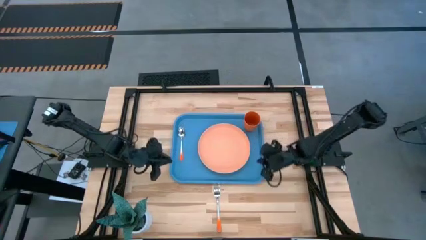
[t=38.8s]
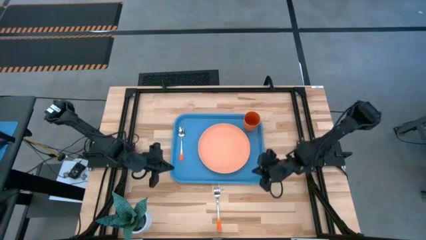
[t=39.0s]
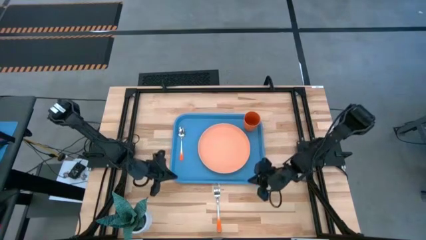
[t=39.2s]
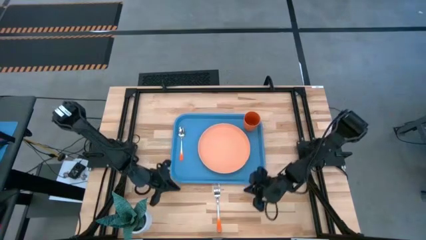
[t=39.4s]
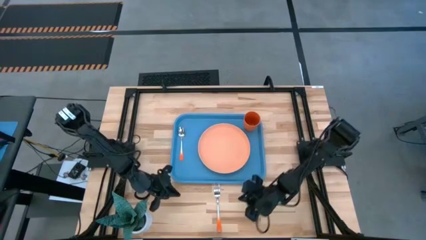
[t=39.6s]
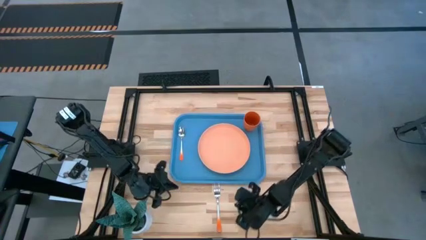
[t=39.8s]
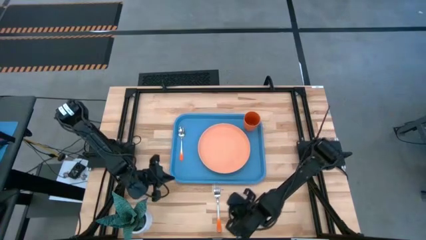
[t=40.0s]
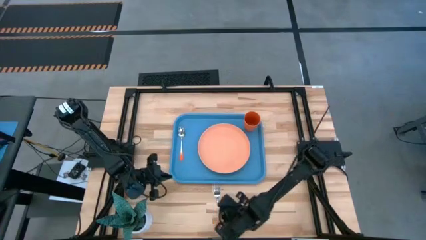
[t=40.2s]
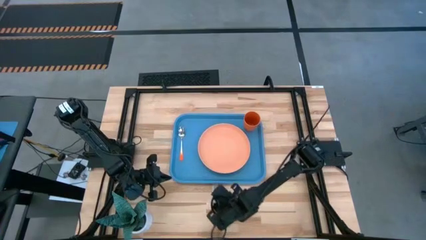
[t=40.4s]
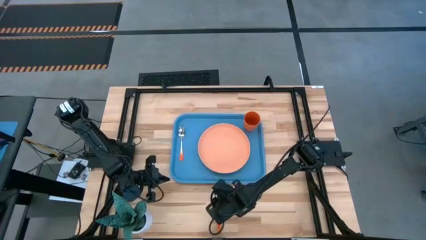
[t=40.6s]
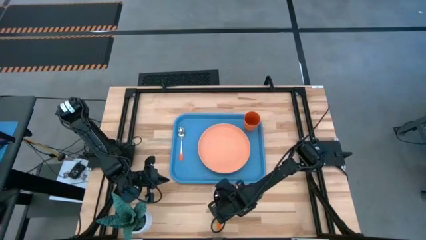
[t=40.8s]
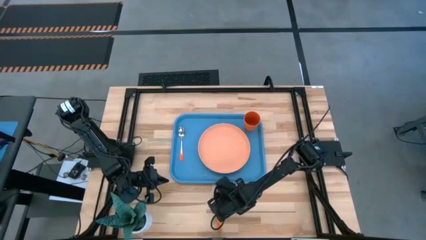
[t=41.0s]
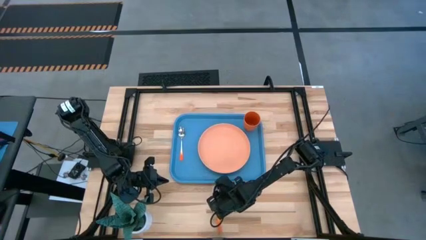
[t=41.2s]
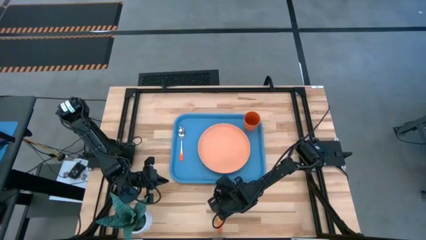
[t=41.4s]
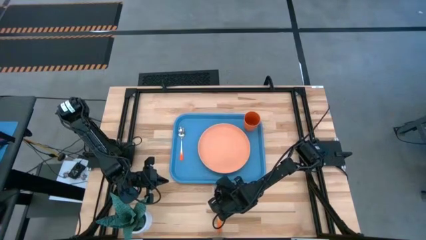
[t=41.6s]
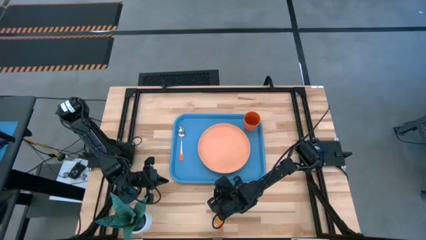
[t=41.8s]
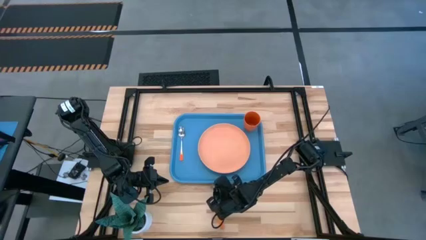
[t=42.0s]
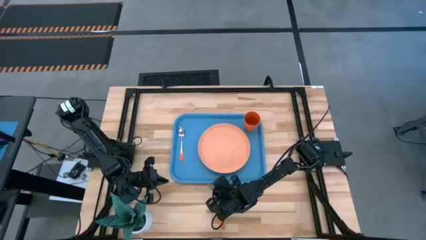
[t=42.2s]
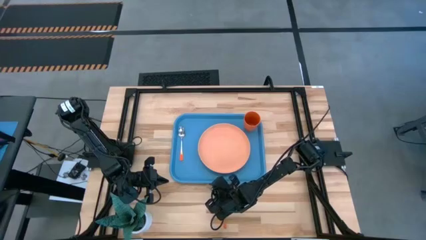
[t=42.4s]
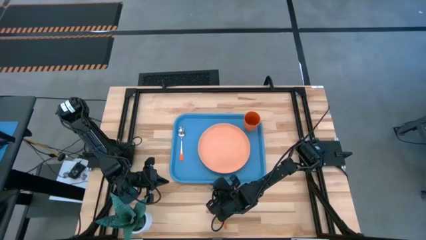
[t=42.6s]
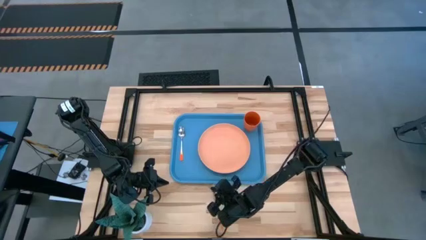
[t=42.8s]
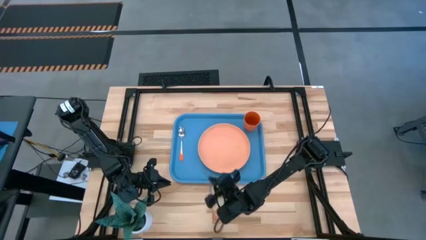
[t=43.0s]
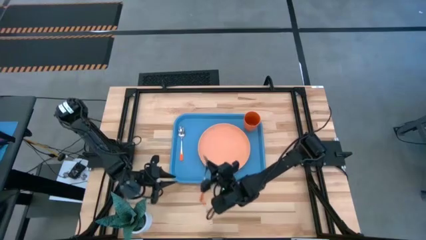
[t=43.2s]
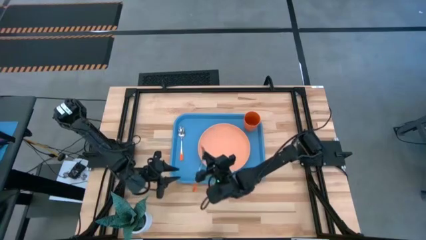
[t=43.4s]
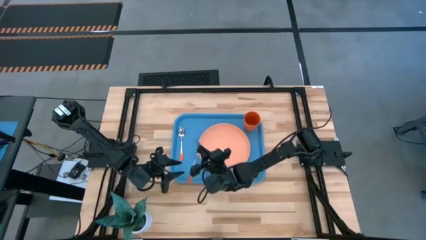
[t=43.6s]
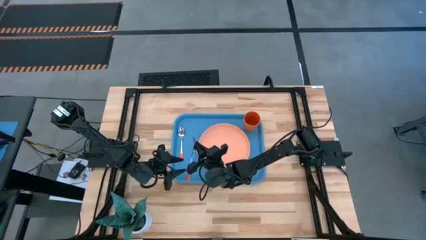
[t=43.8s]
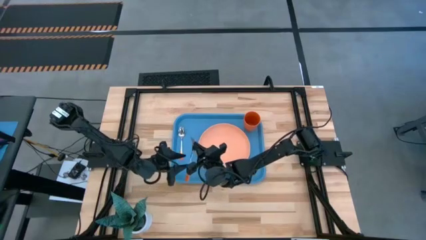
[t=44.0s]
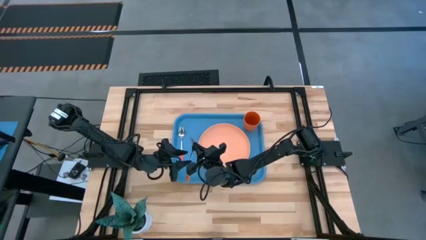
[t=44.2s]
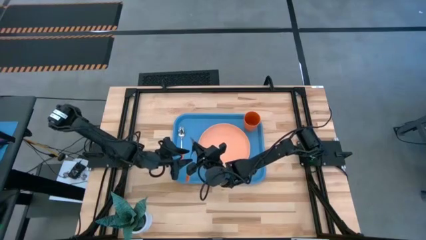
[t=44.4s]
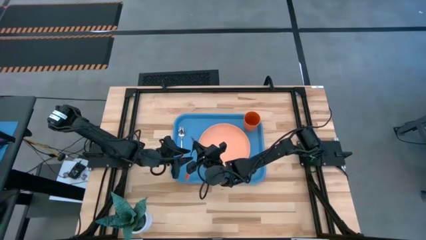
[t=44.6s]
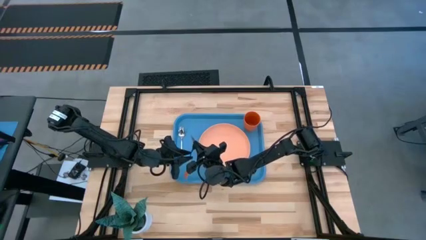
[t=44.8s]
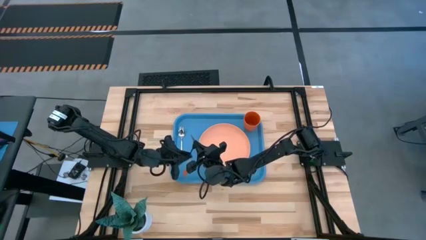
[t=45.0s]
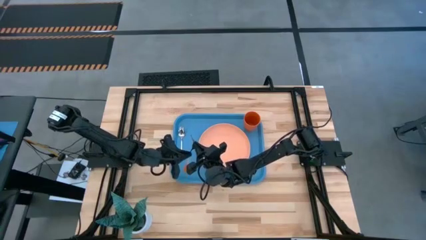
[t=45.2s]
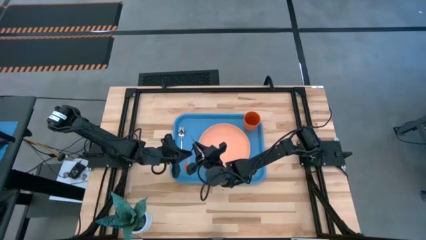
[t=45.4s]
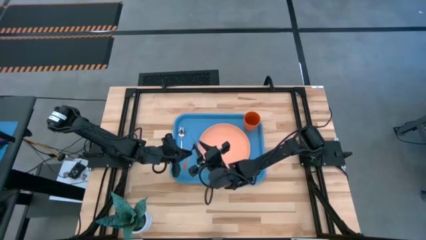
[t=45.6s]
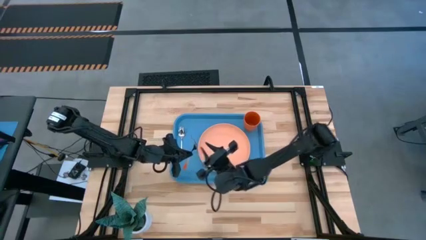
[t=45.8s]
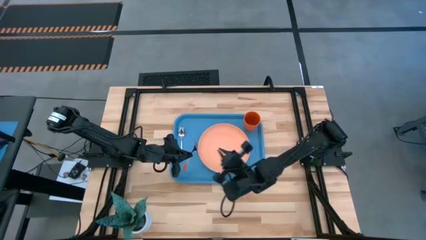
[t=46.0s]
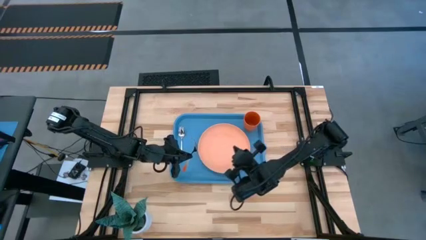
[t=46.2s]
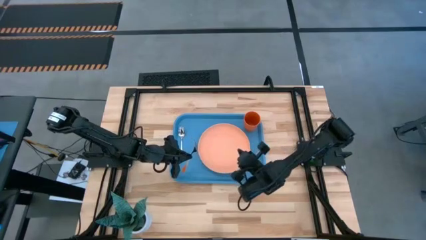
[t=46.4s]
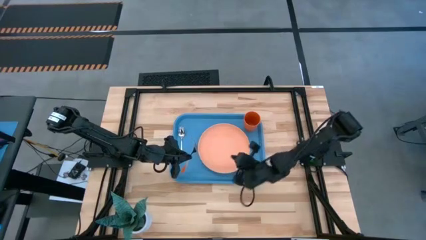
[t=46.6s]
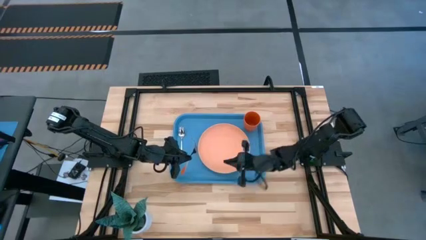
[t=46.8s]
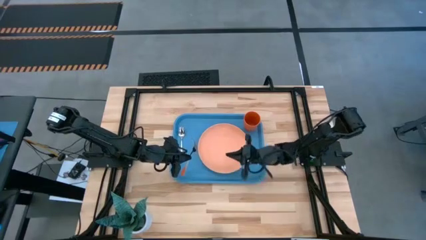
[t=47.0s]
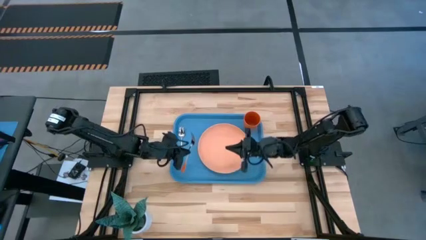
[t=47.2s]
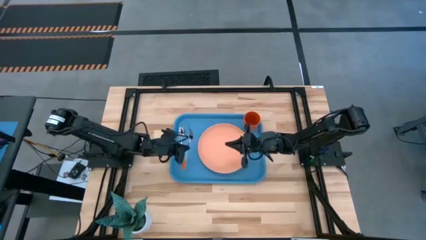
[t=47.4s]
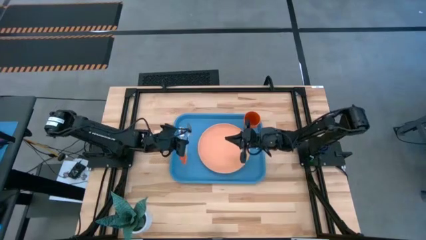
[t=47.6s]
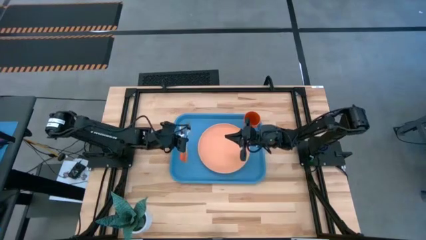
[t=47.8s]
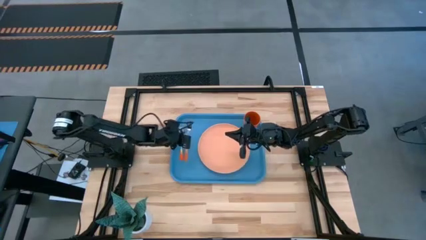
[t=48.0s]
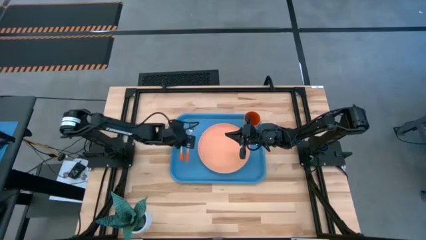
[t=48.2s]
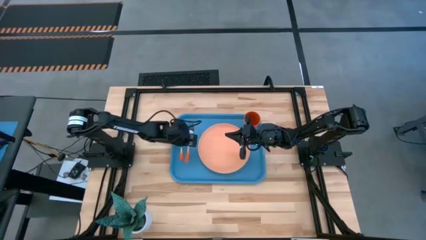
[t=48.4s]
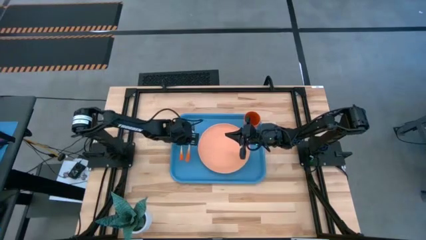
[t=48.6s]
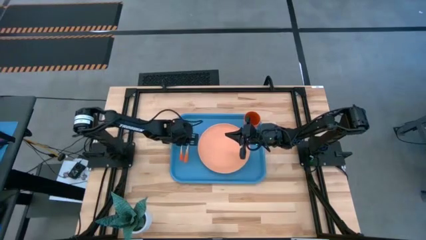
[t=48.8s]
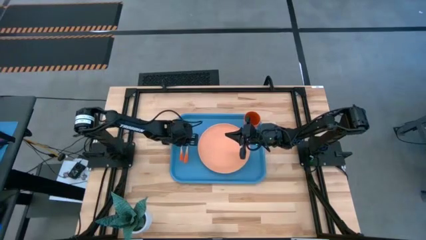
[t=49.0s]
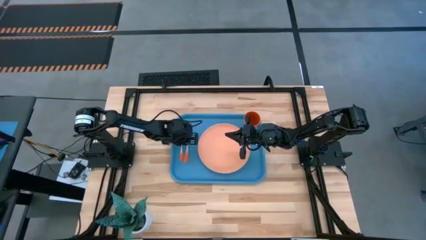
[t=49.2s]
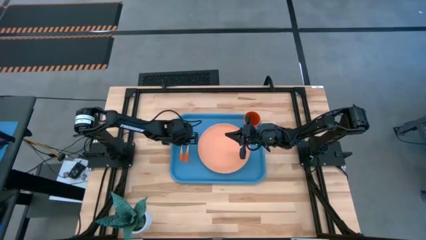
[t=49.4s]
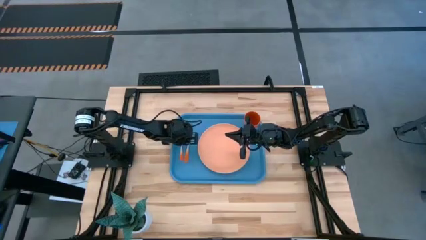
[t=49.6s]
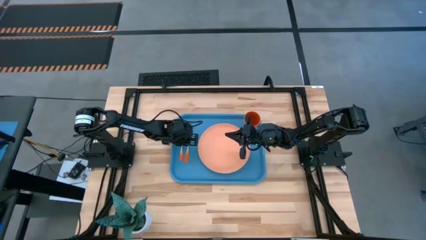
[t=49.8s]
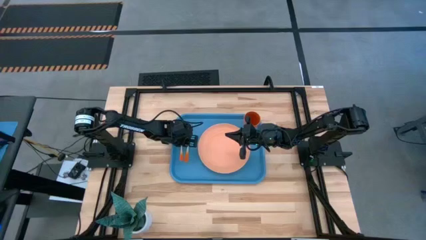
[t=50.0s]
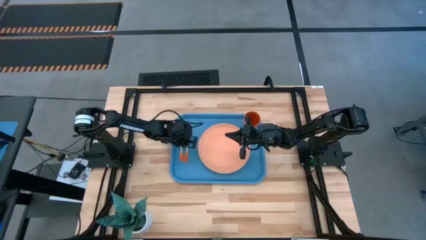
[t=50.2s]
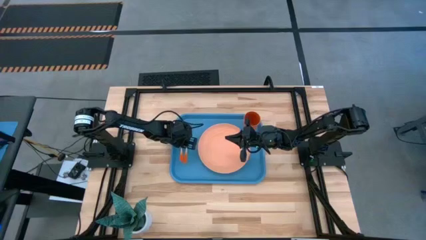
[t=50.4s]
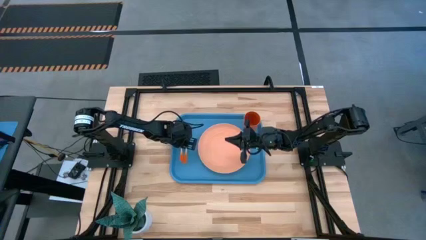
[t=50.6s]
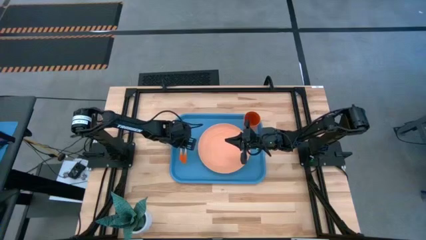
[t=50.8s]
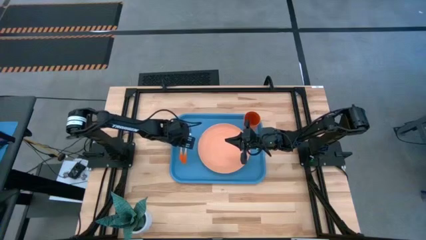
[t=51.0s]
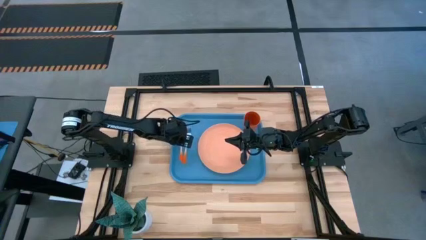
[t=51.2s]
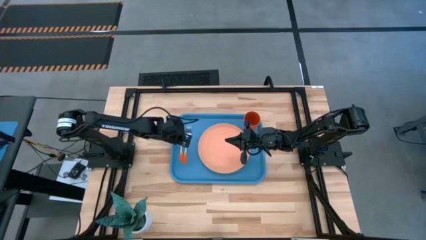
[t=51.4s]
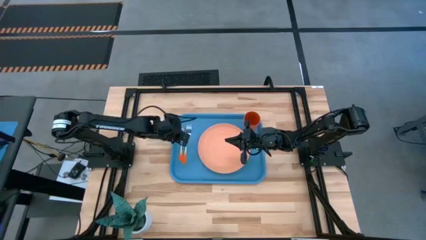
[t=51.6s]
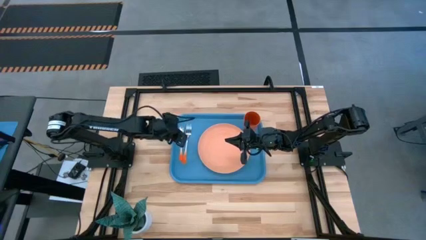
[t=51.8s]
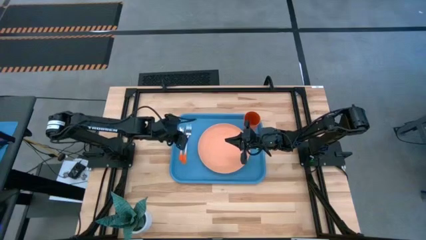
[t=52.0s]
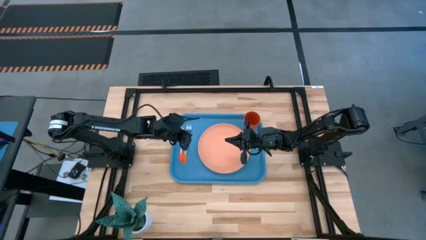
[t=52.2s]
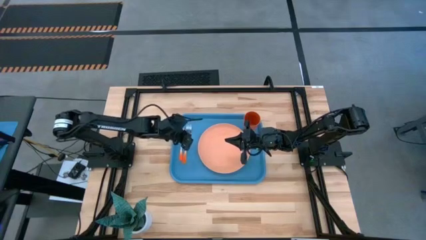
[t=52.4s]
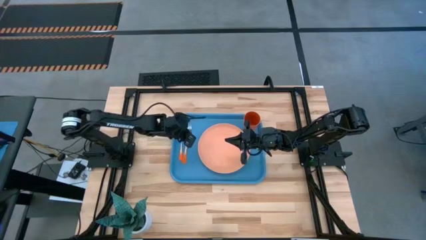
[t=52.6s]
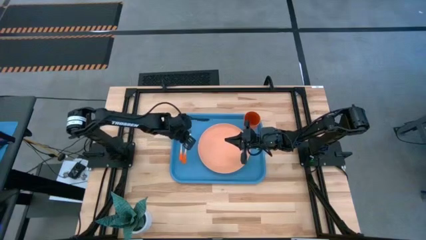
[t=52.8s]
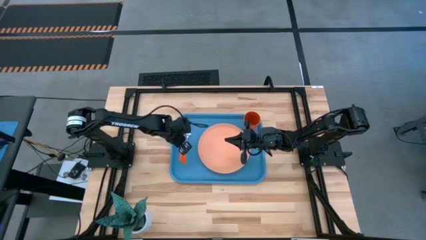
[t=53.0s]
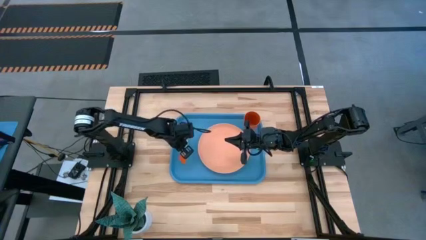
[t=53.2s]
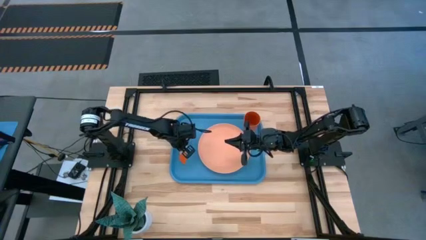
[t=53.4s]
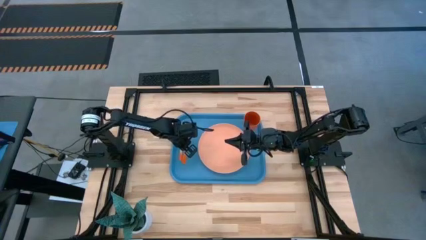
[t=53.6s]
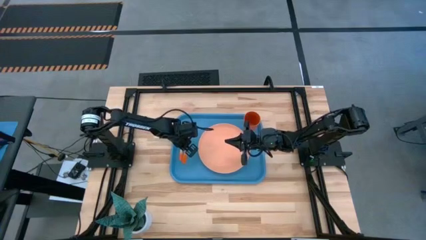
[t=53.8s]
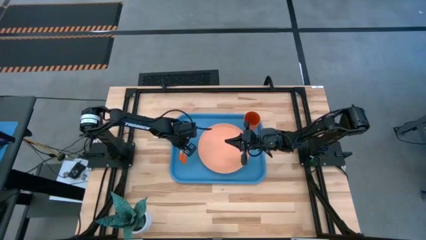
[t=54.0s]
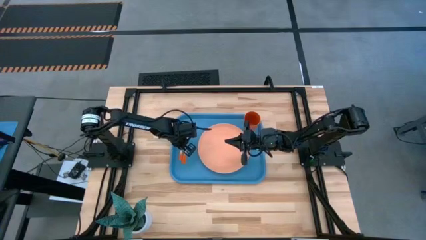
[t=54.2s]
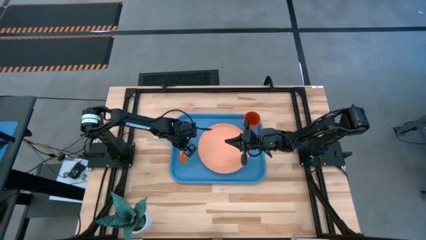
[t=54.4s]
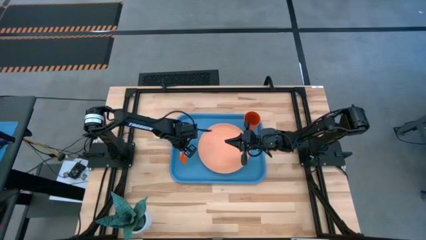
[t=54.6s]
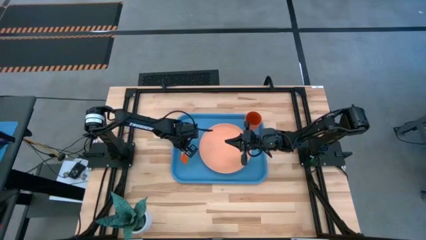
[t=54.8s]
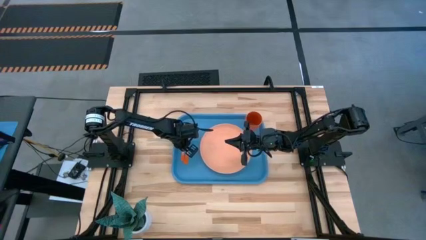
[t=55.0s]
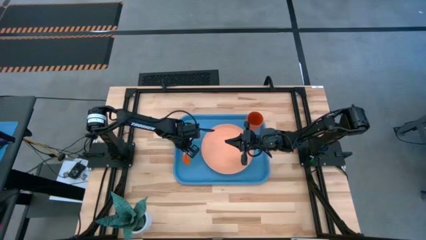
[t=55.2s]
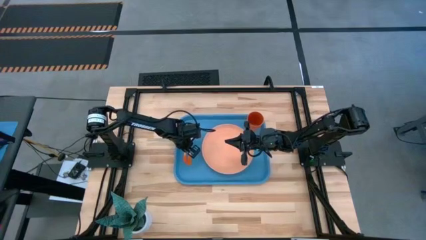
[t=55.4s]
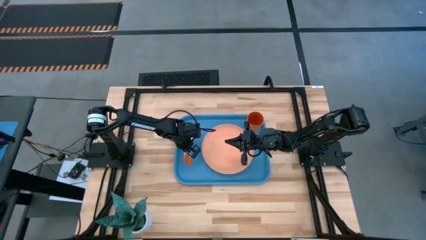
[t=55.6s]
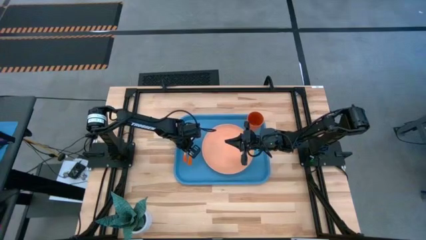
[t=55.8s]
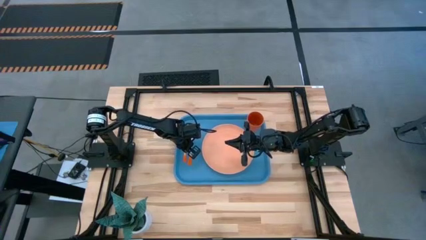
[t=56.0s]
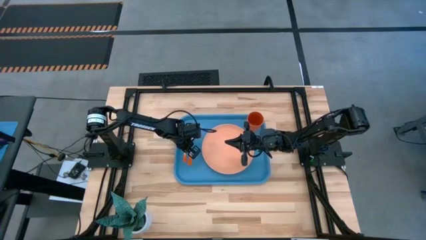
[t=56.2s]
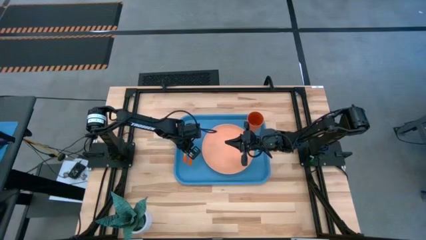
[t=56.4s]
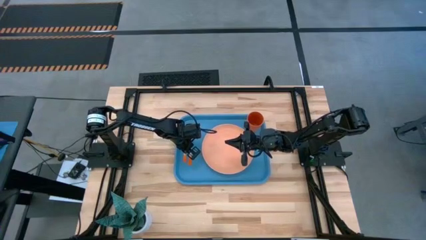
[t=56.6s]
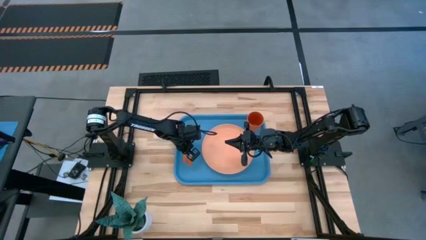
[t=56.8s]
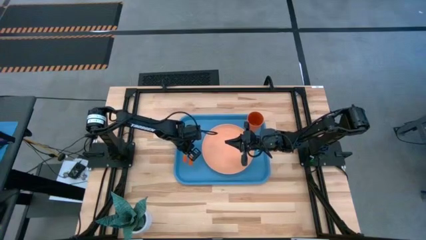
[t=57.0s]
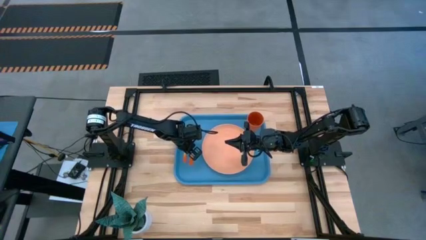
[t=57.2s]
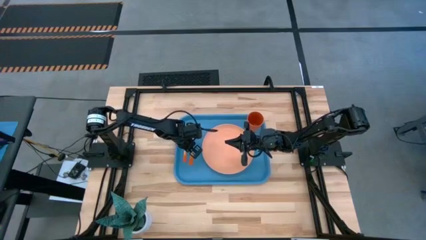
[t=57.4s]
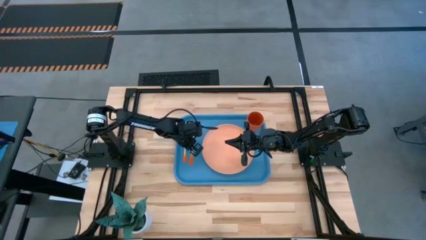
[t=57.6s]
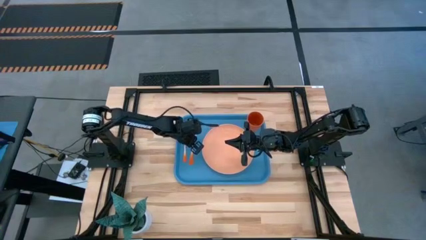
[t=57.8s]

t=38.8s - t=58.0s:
Task: Pick and place plate/cup/fork/spoon on tray
Put the orange fork on the blue tray to the left of the light orange plate
